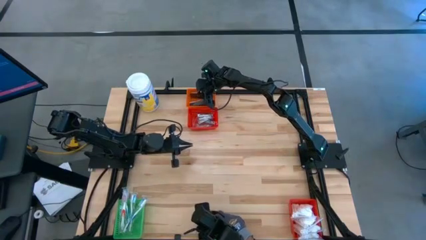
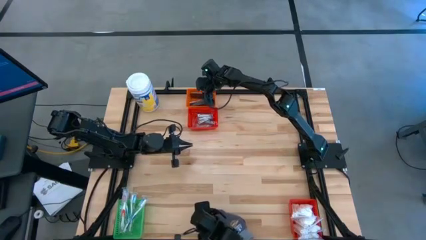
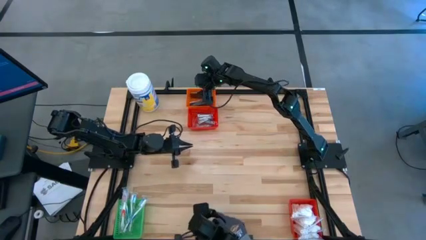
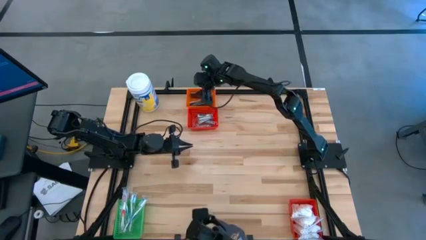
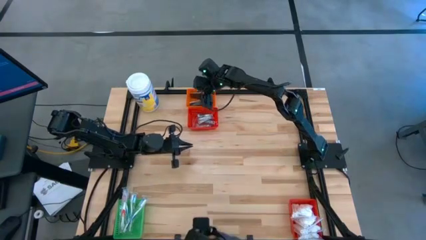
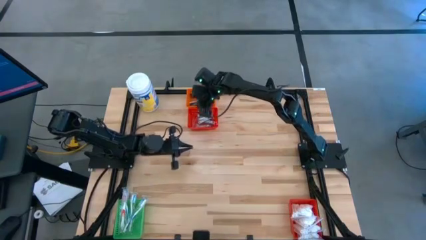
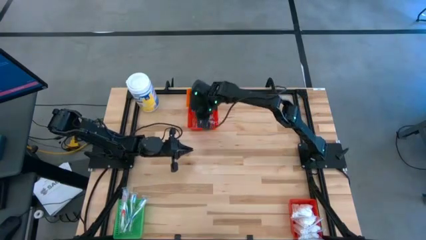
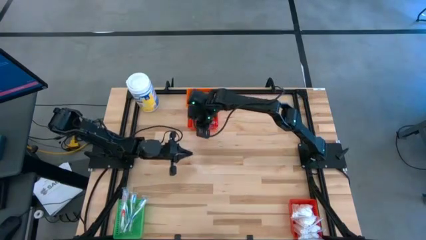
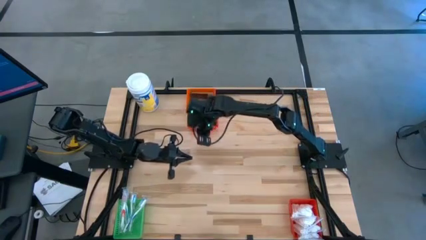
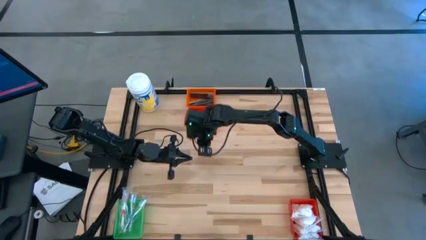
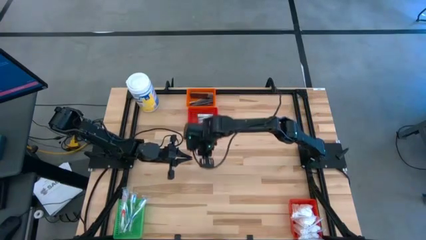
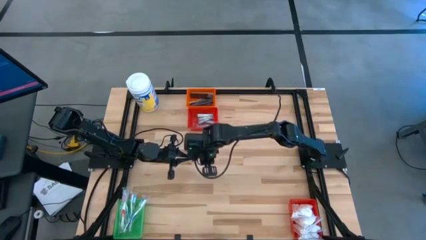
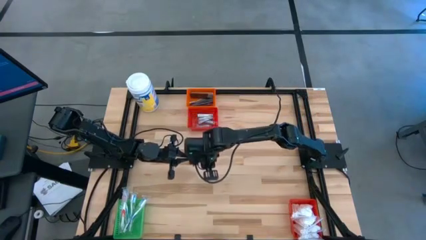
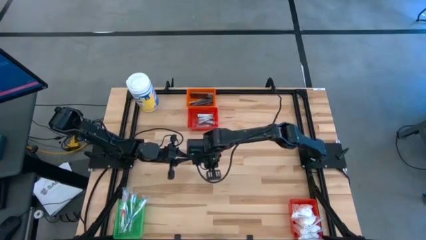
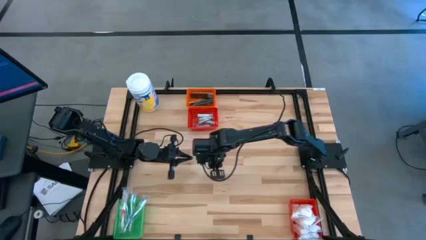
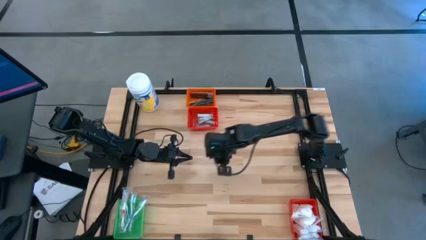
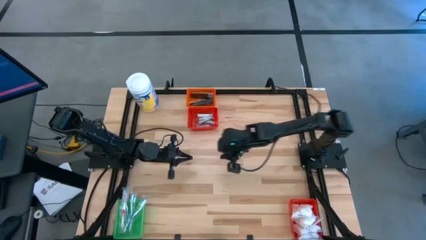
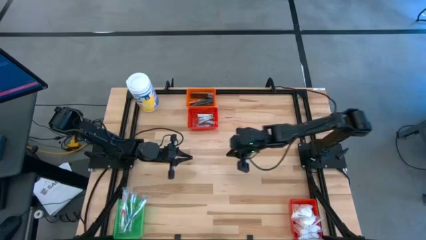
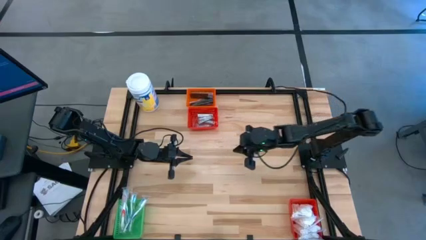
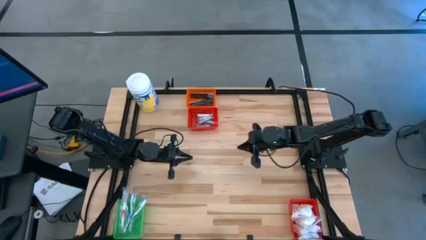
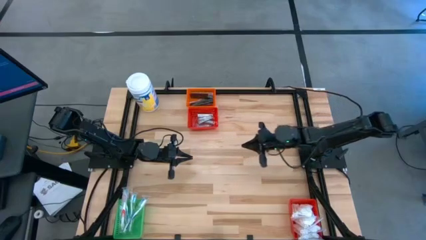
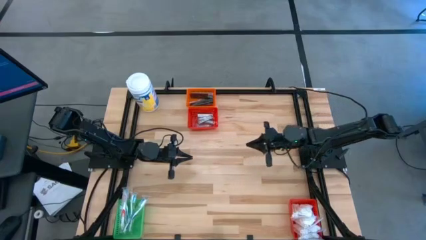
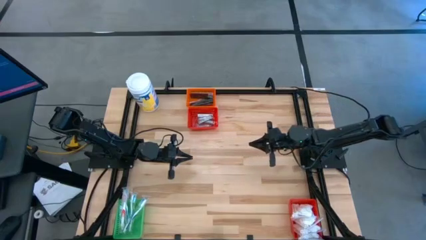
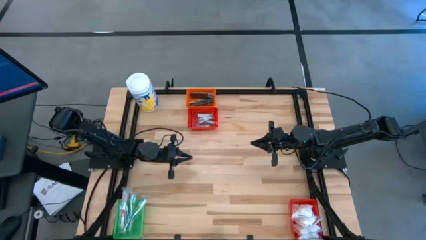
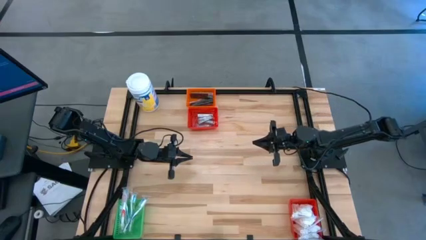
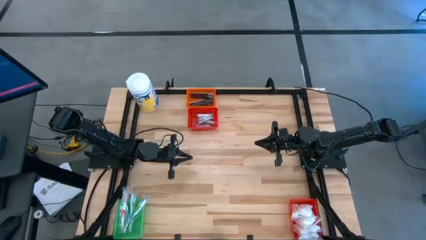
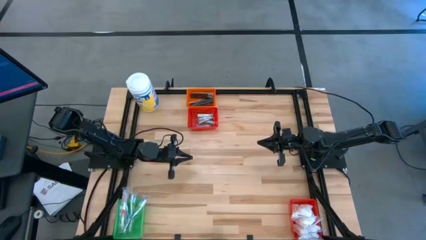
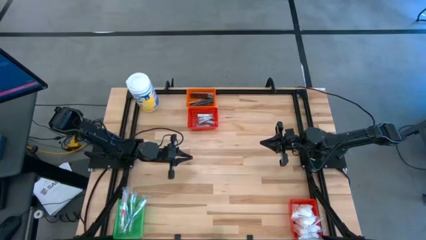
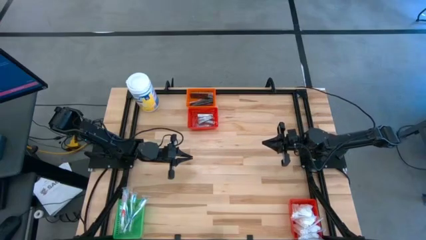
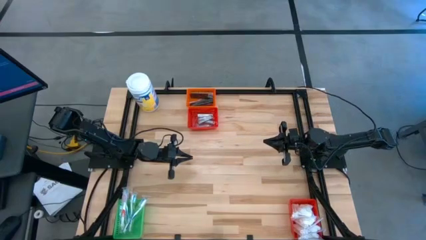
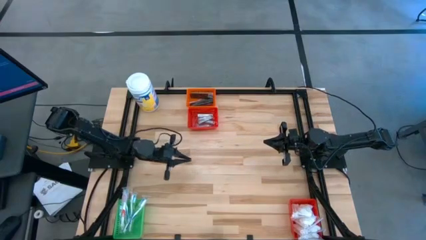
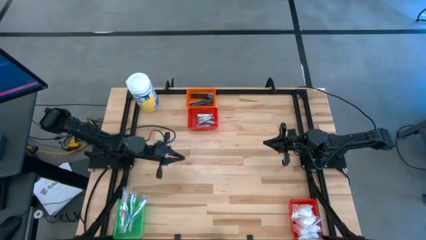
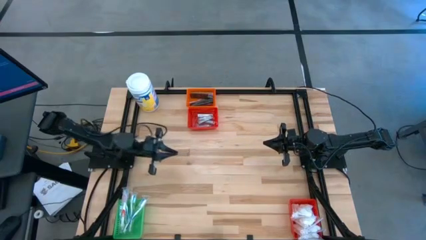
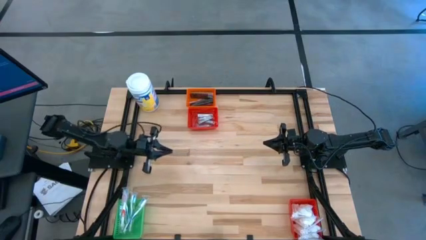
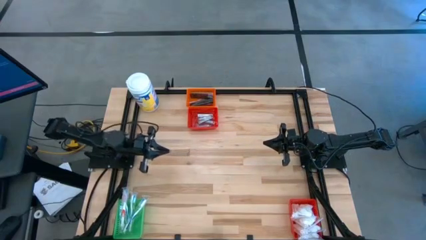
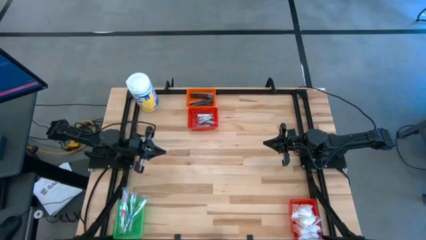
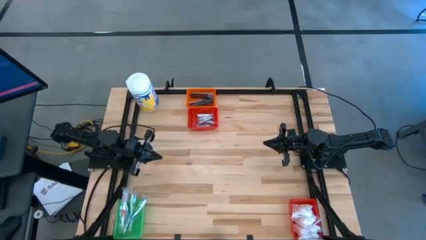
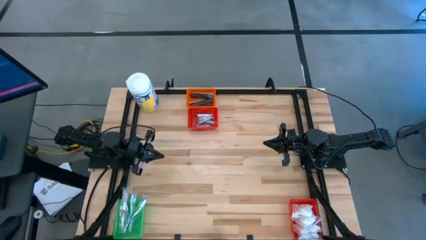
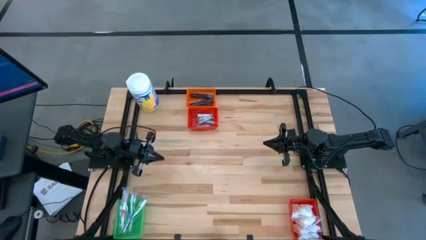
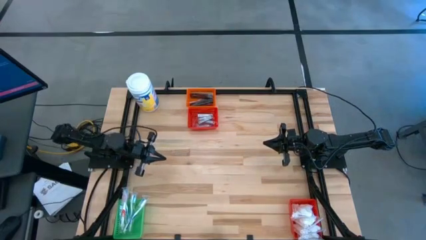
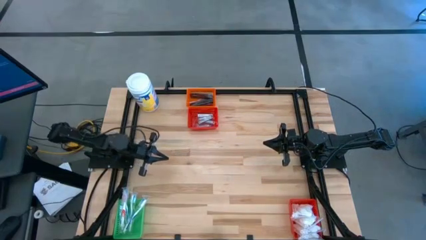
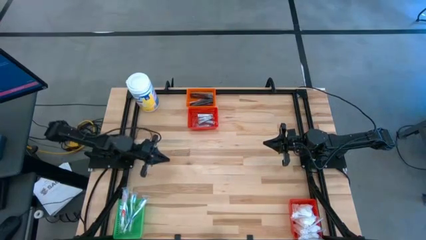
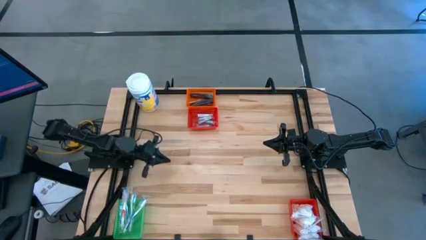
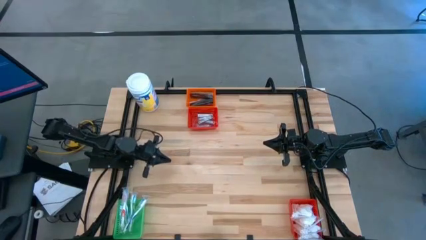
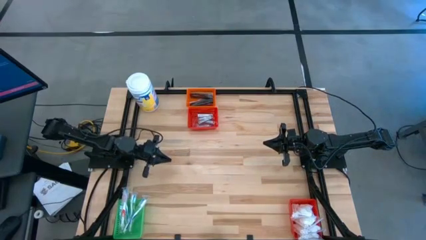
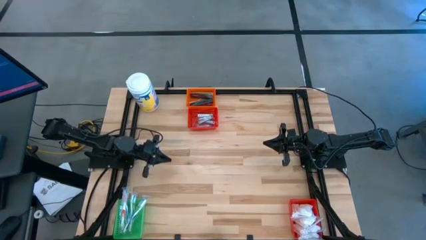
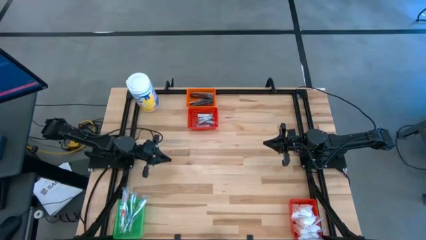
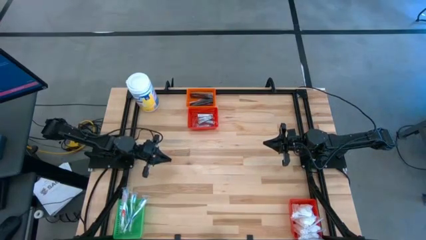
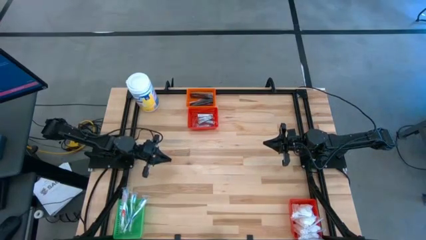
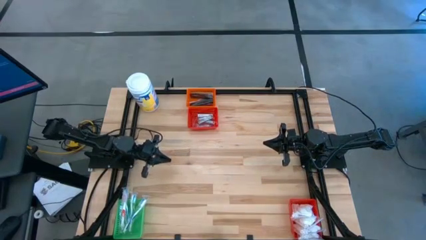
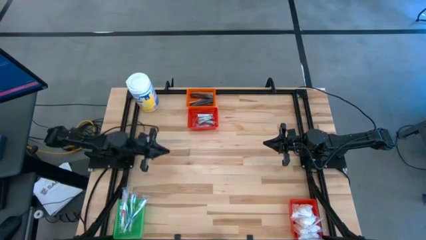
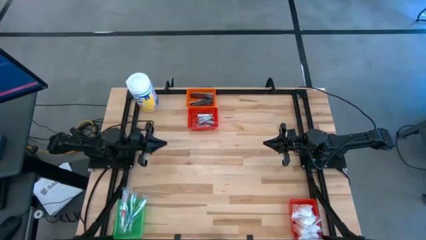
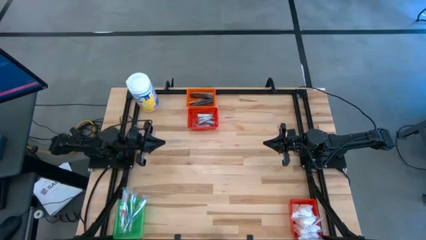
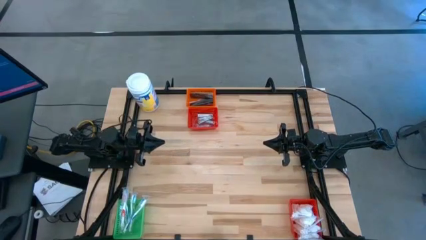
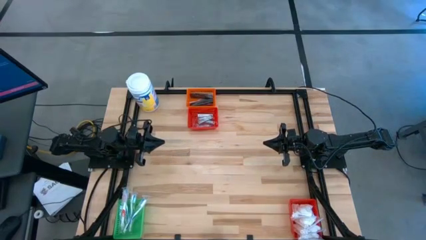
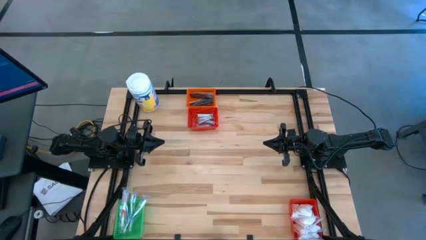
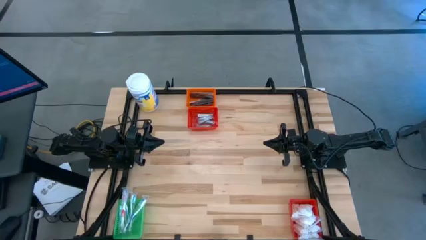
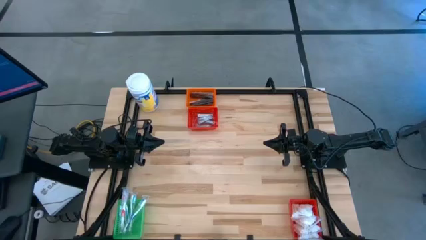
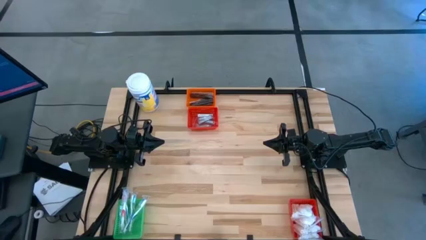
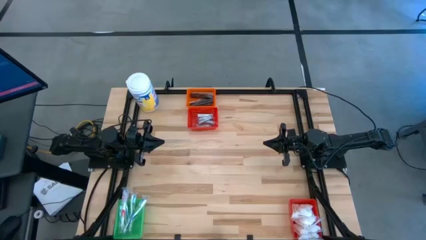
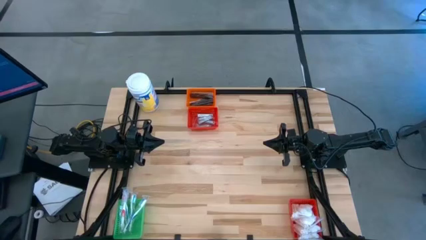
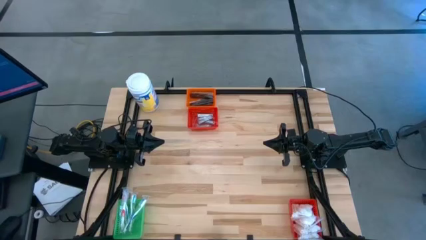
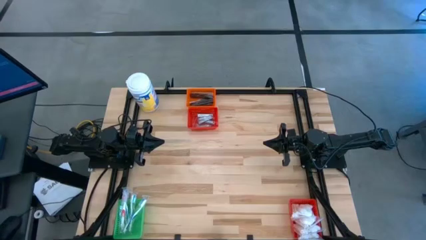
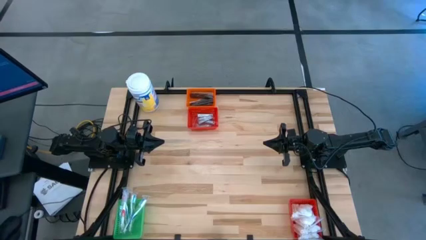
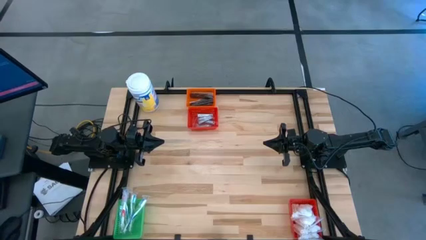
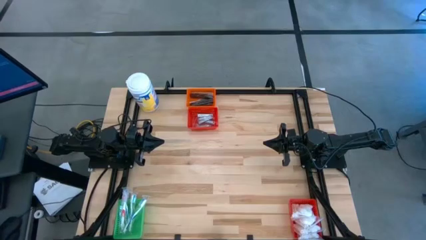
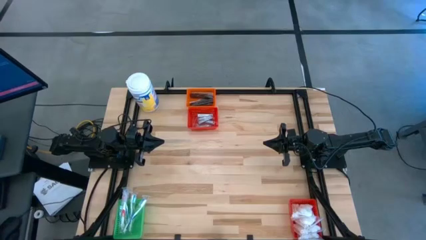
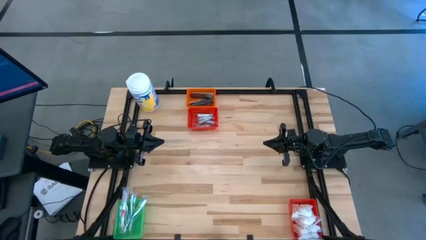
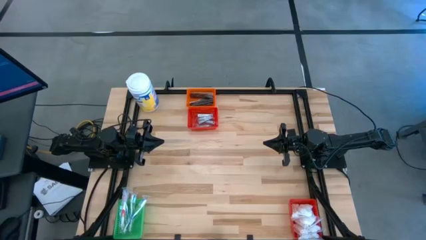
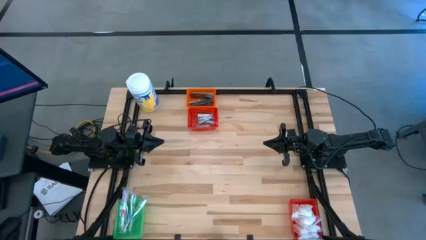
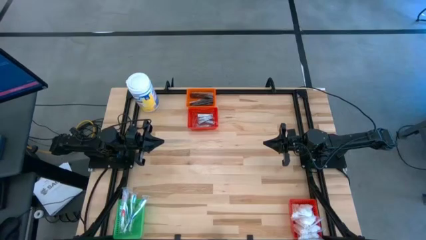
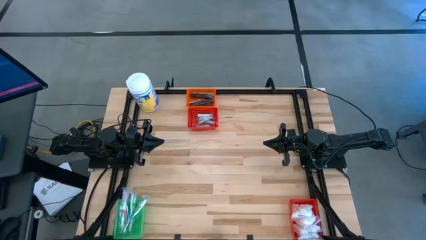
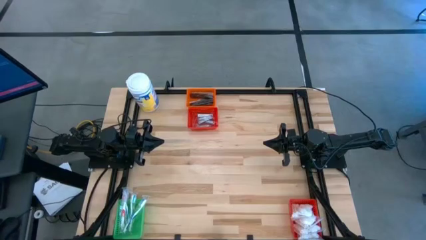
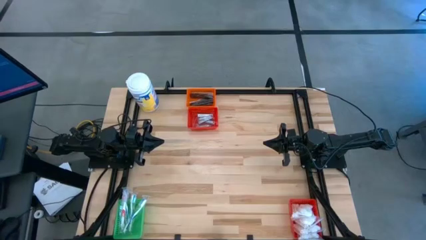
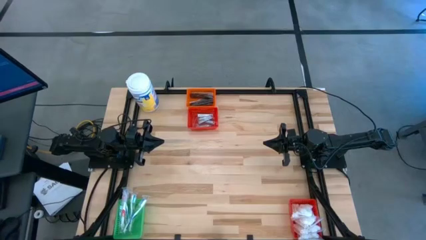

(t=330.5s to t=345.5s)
Task: Pick & Place Travel size toiletries
Return to Home Position

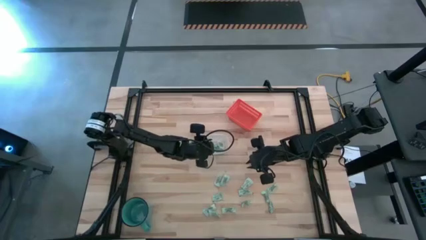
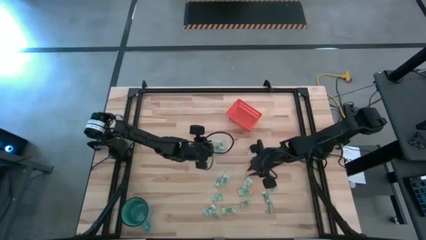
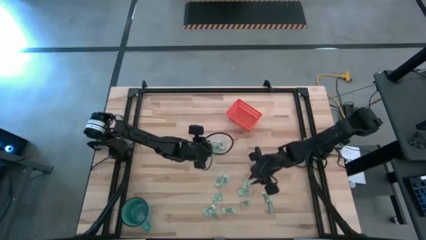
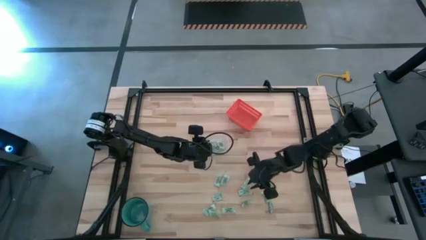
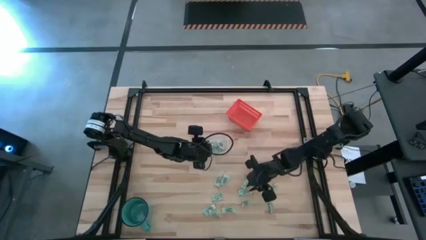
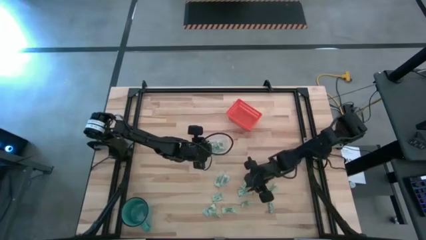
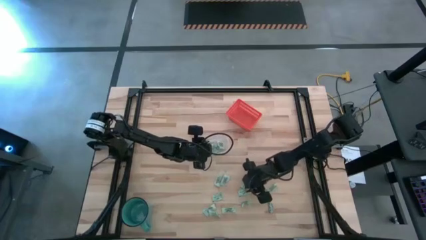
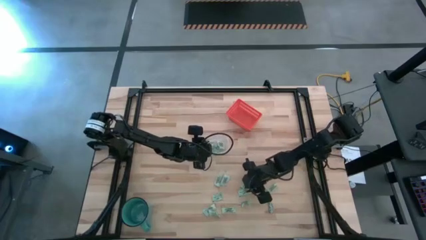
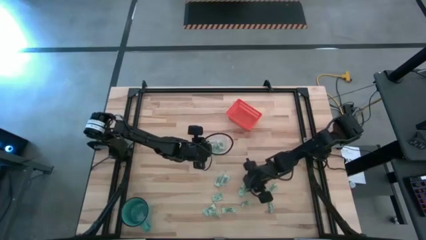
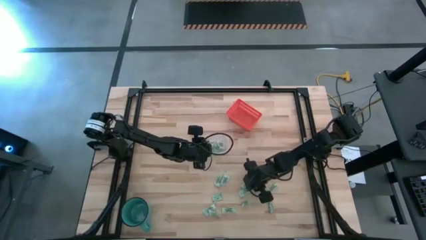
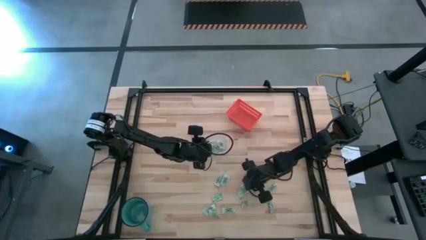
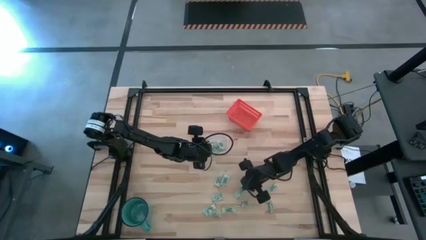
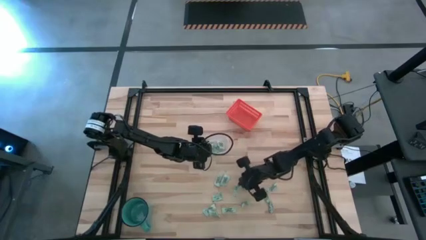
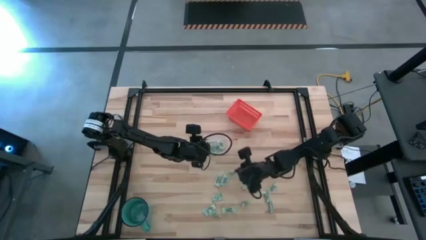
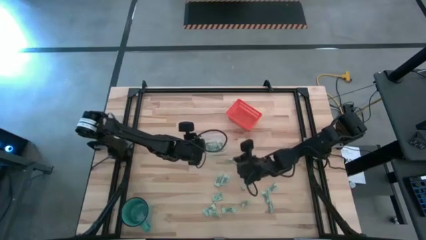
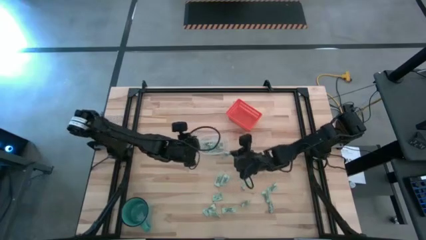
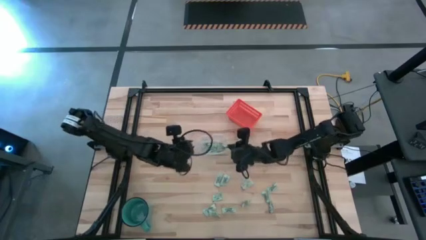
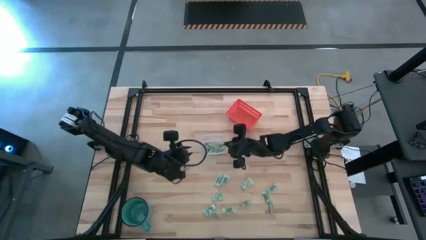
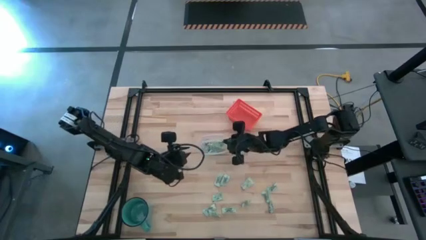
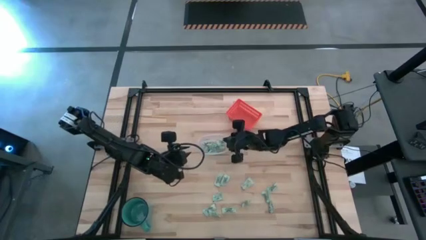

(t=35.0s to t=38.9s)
Task: Pick and place items into bin
Put the stevia packet into the transparent bin
